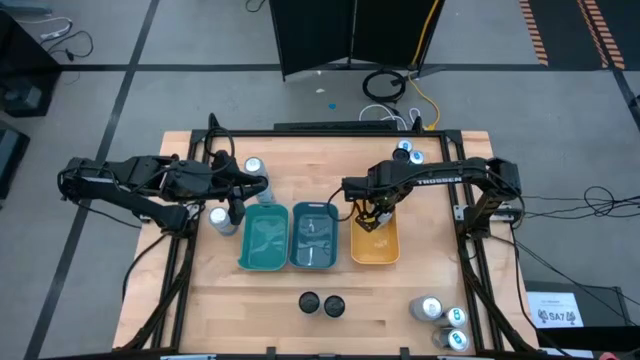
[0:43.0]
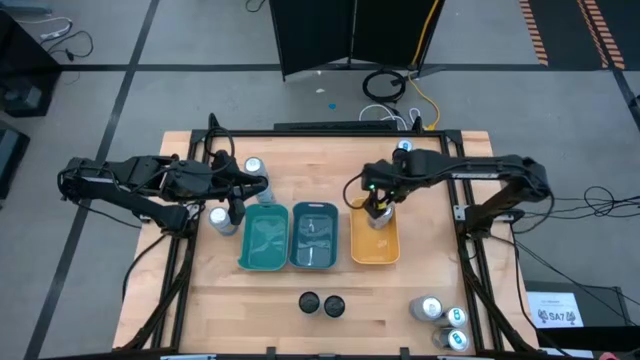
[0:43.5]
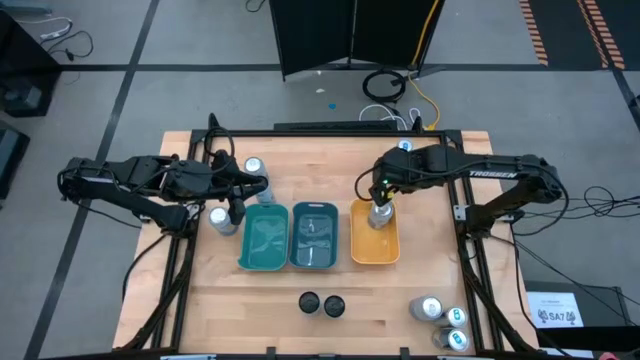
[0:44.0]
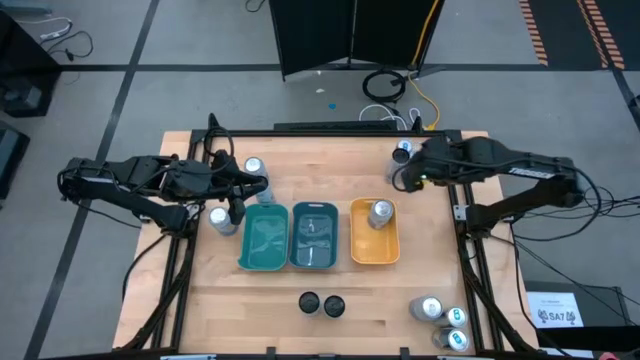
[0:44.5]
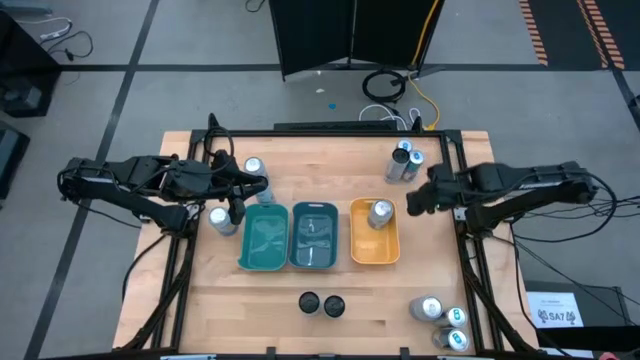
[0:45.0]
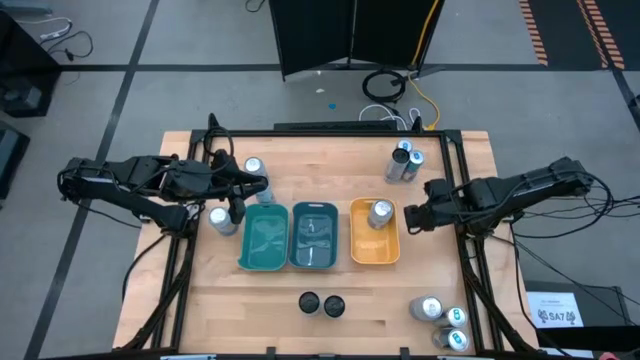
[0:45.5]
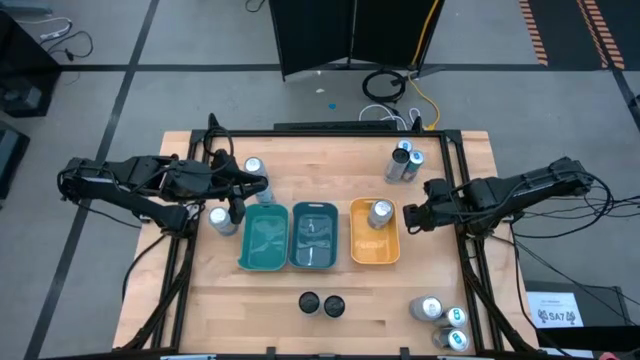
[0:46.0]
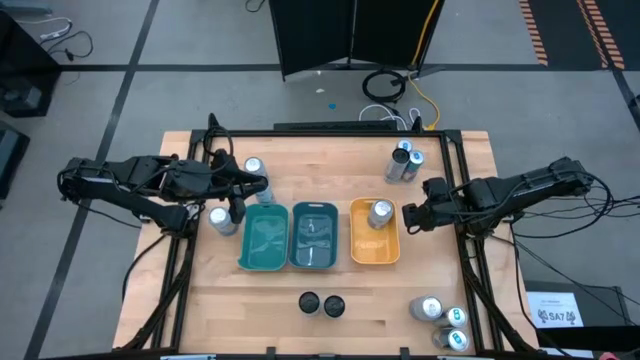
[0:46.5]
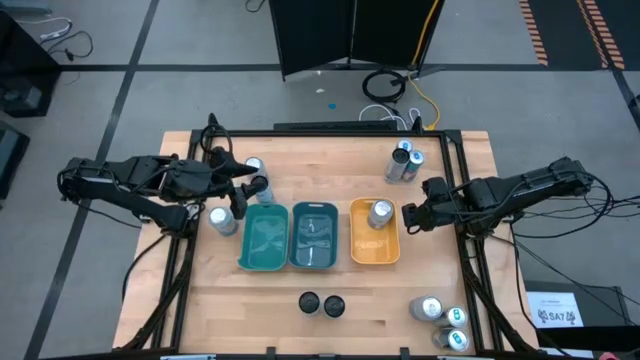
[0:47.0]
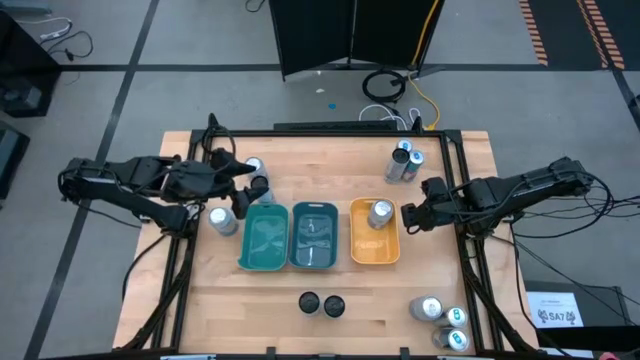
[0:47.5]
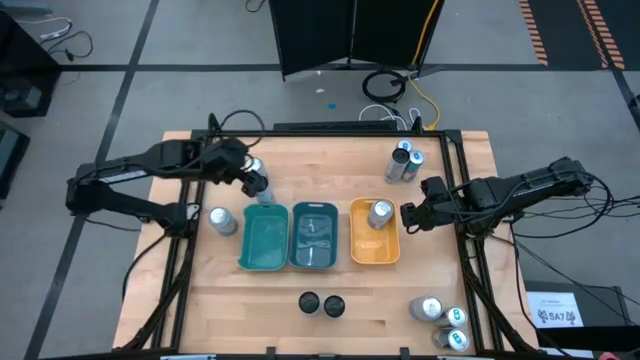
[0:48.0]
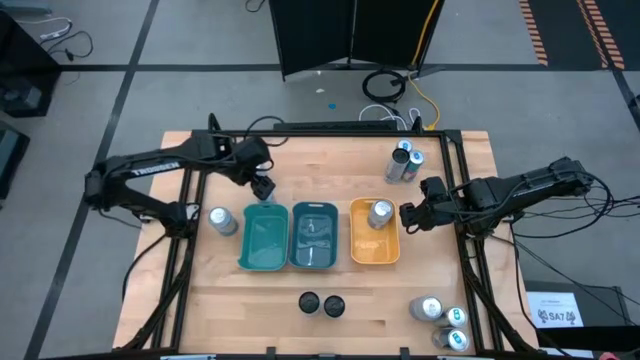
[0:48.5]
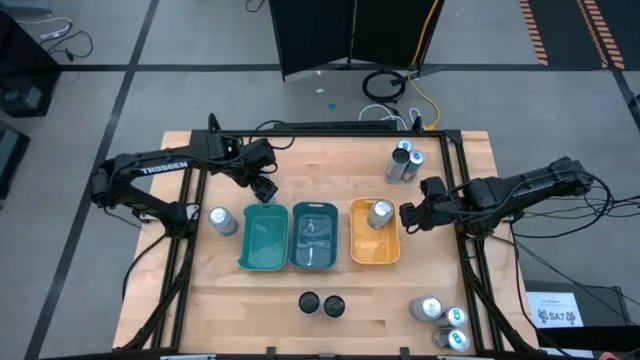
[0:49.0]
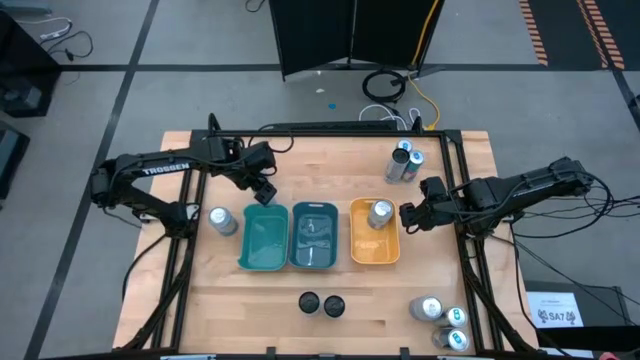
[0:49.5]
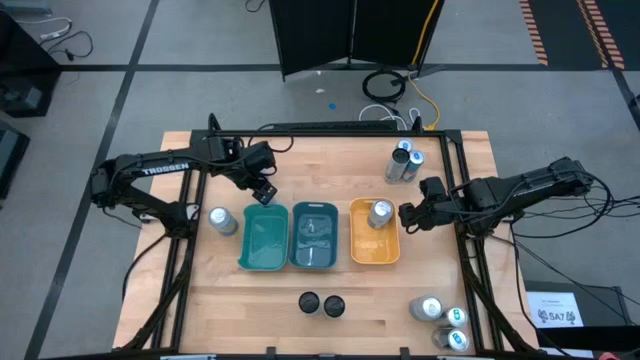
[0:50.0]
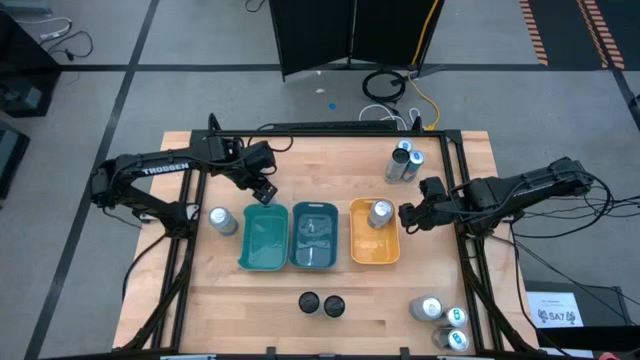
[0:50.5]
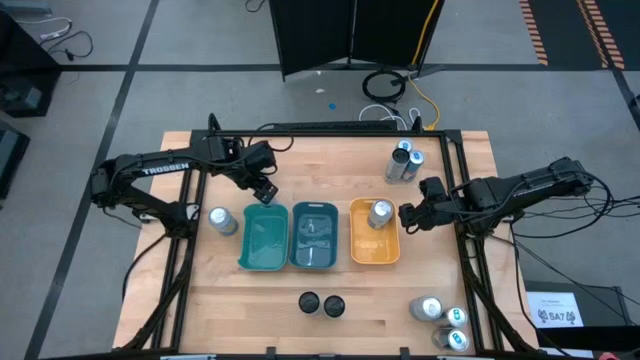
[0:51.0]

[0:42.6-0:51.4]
Task: Sort soda cans
Put the top left black soda can into the blue bin

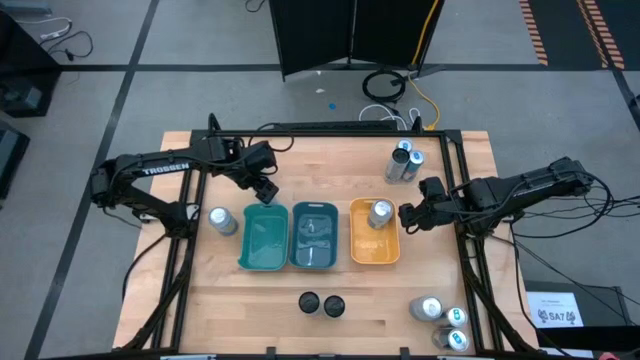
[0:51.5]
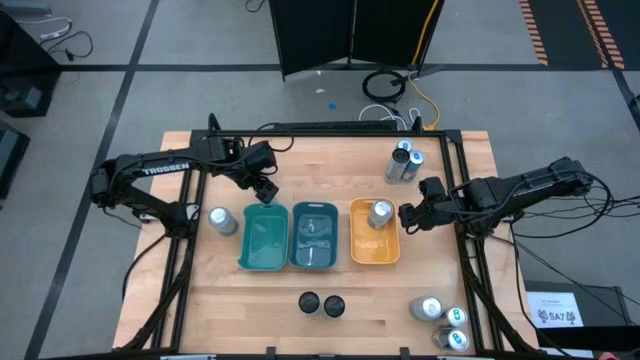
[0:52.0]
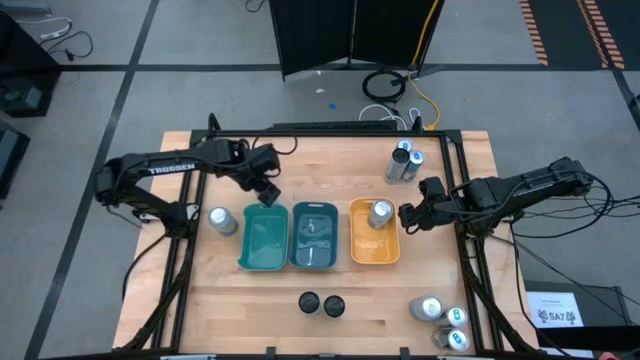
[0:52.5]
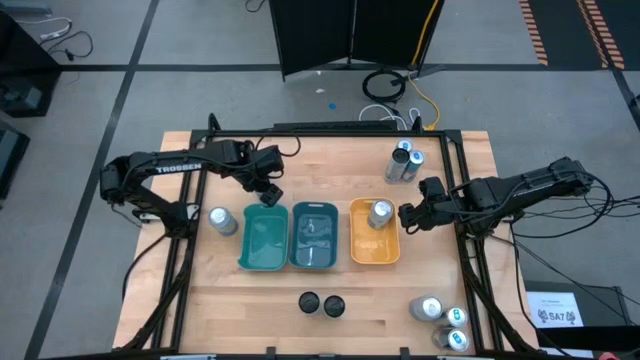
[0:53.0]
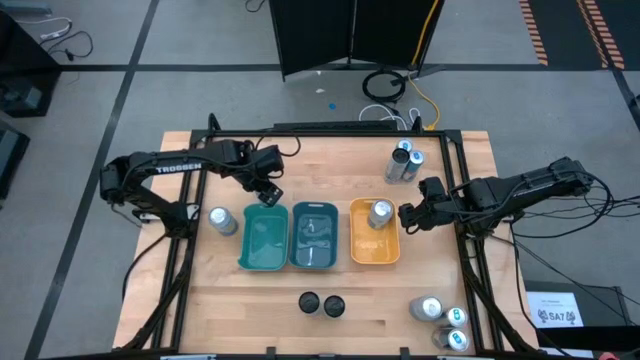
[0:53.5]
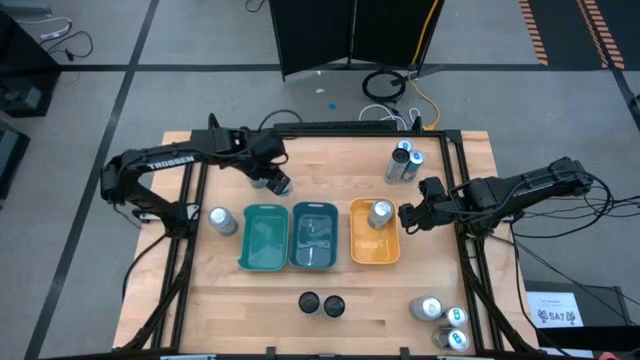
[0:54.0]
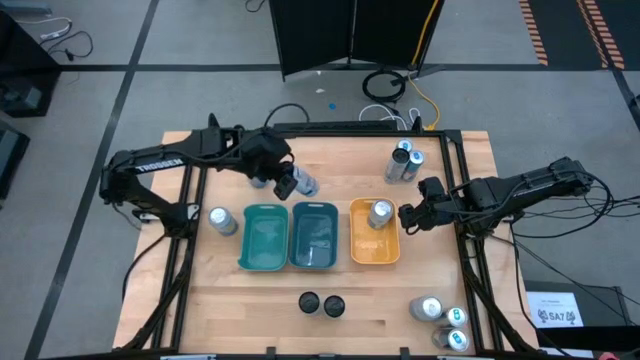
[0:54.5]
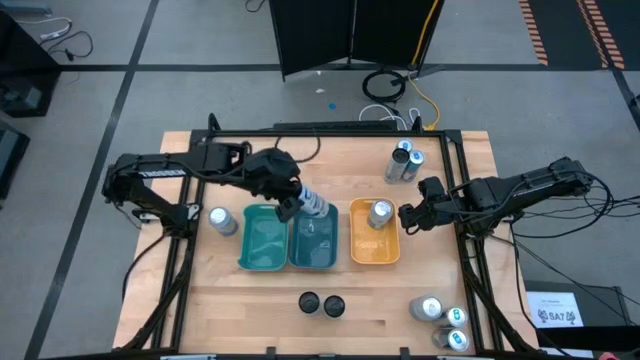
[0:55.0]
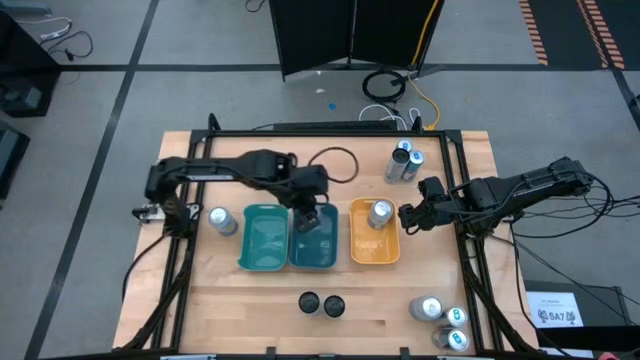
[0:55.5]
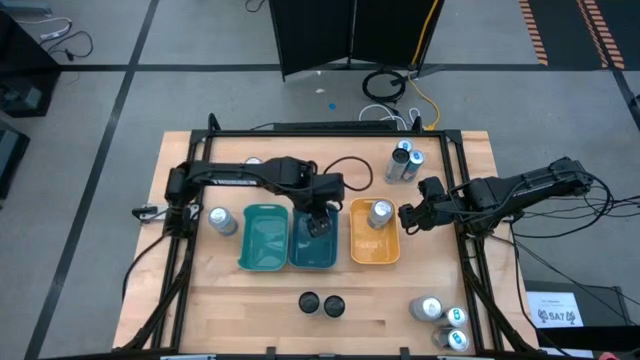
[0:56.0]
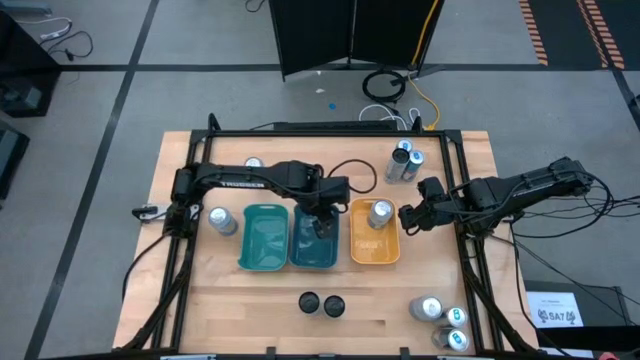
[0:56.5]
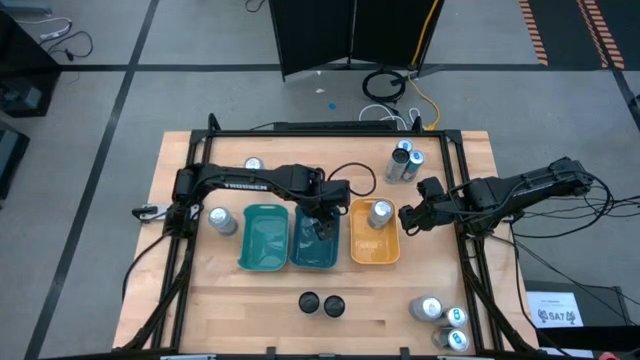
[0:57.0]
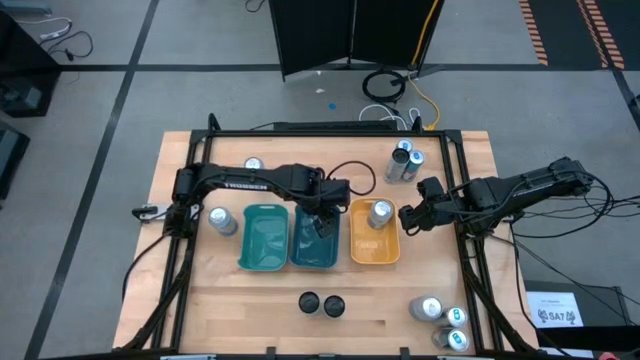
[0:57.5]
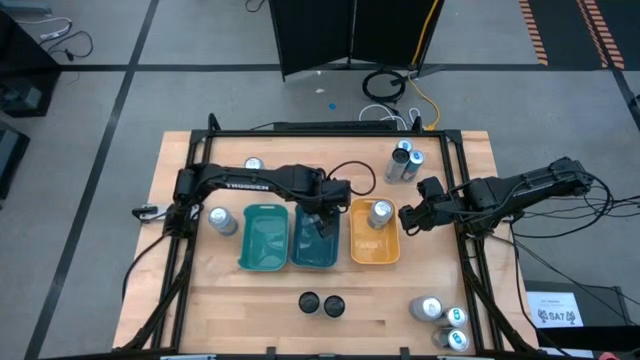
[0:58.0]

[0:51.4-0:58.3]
Put the top left black soda can into the blue bin

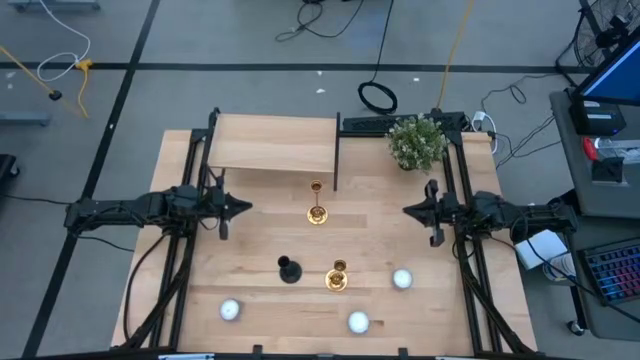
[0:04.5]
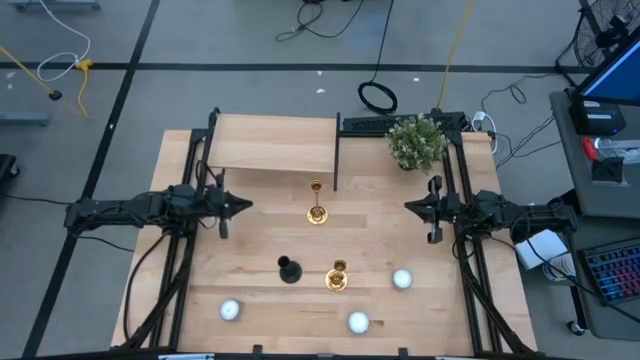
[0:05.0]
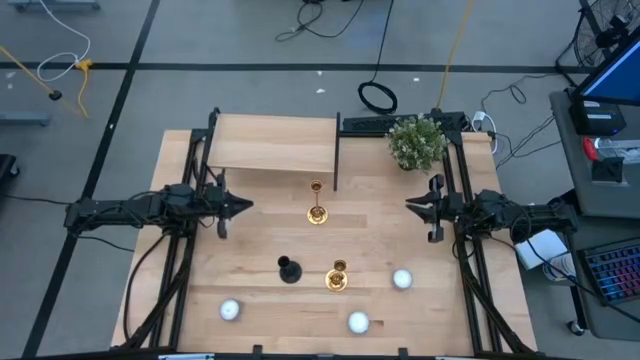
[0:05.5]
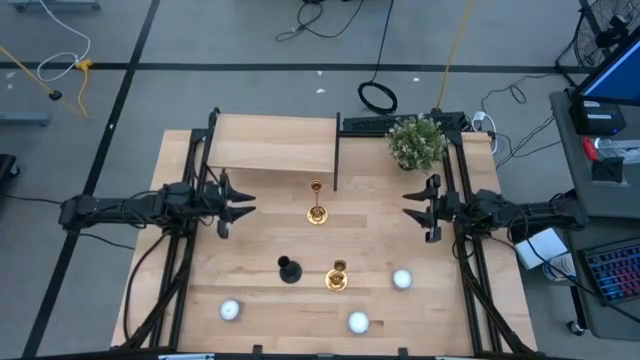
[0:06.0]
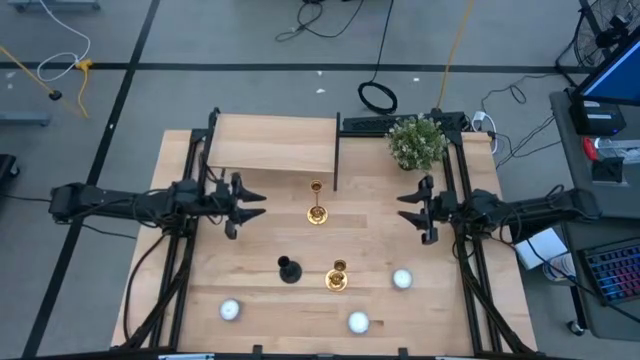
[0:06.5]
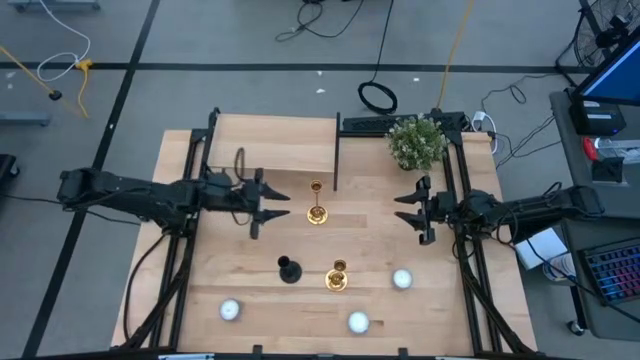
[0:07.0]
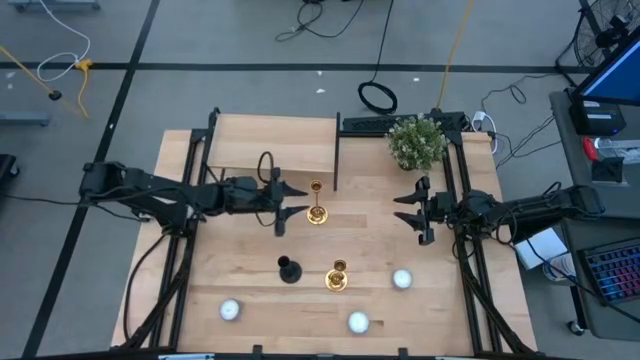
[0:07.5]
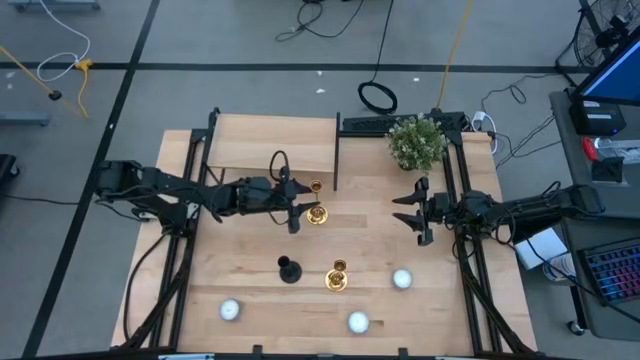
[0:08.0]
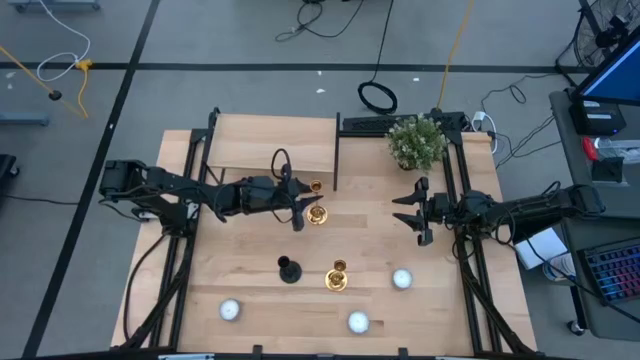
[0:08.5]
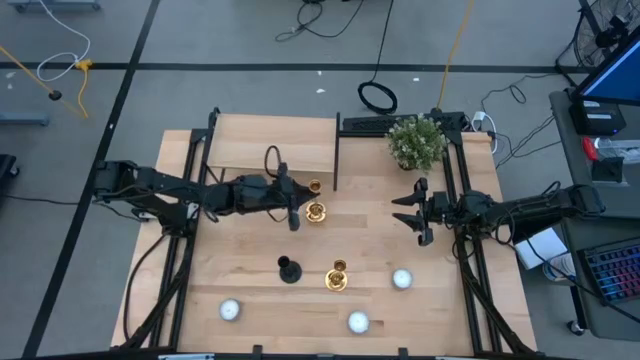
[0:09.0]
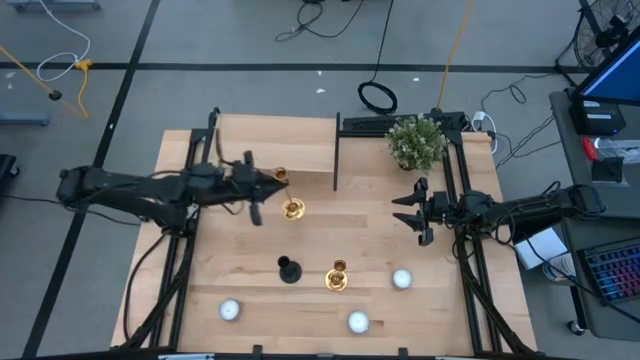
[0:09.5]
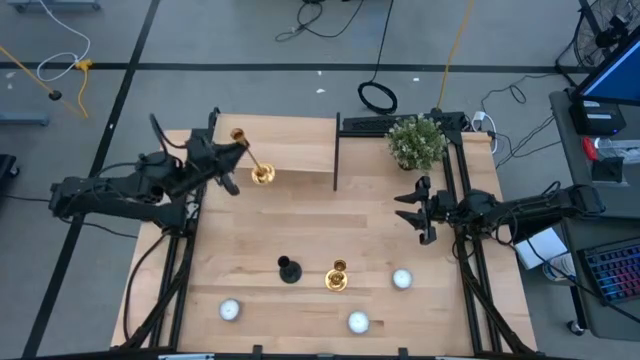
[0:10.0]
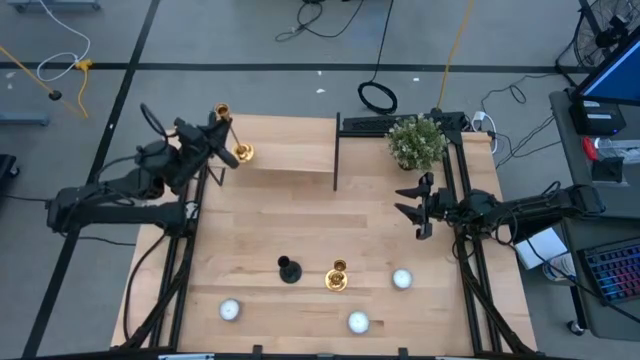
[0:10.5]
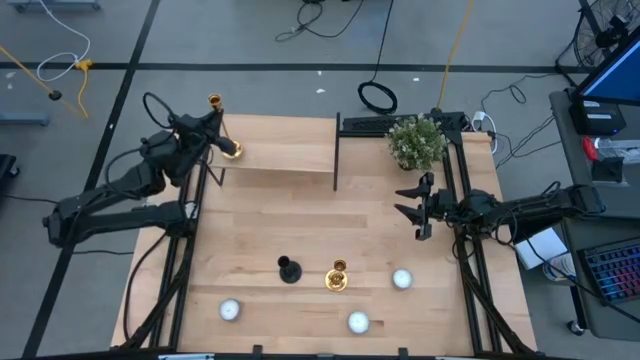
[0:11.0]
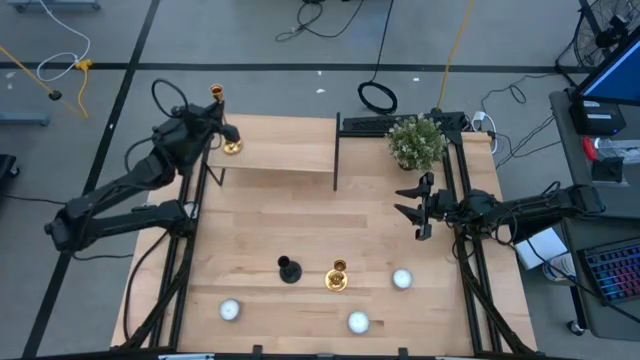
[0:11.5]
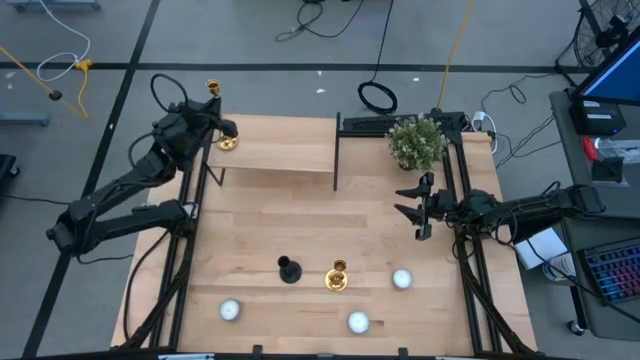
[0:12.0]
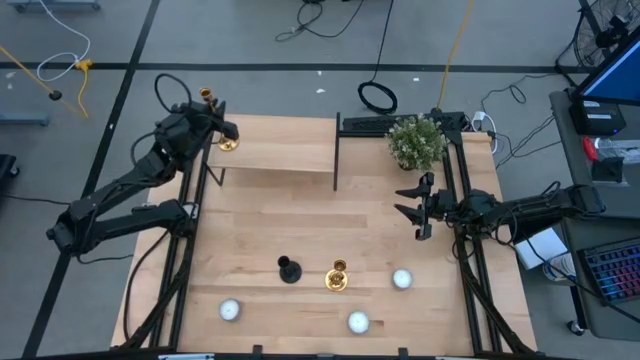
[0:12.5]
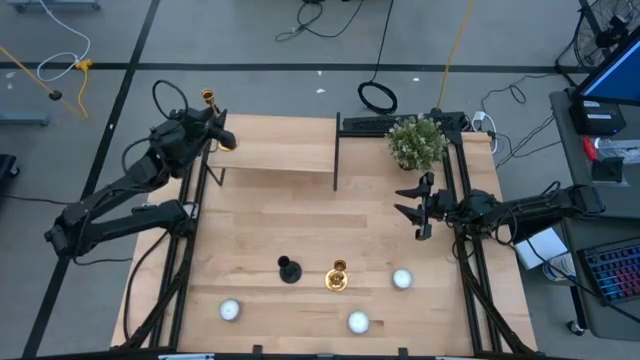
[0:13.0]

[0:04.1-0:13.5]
Task: Pick & Place candle stick holders
Put the top gold candle holder on the shelf
